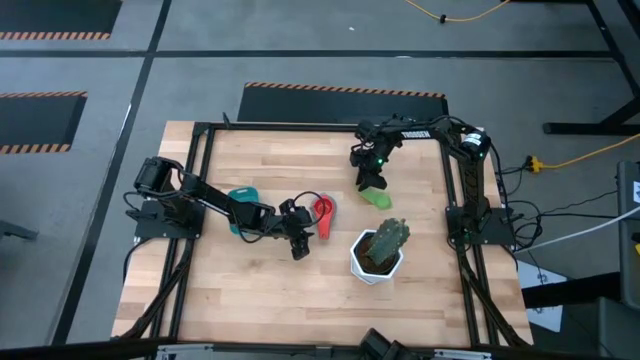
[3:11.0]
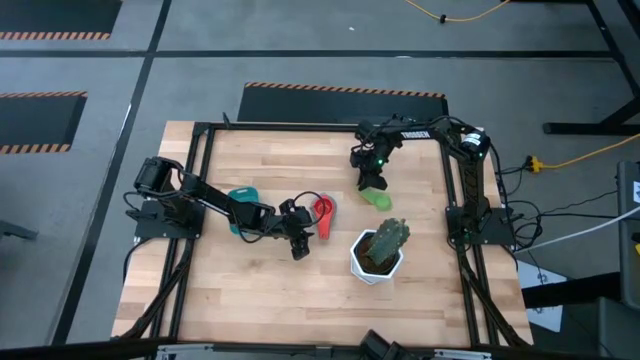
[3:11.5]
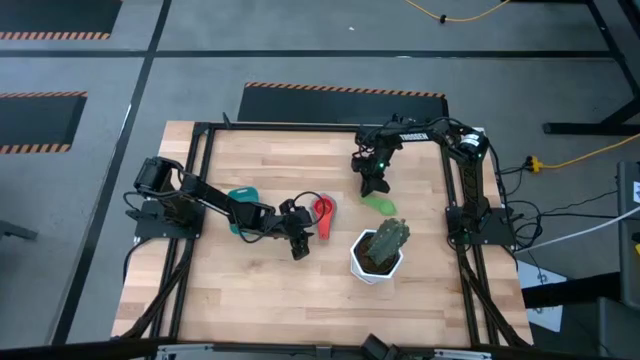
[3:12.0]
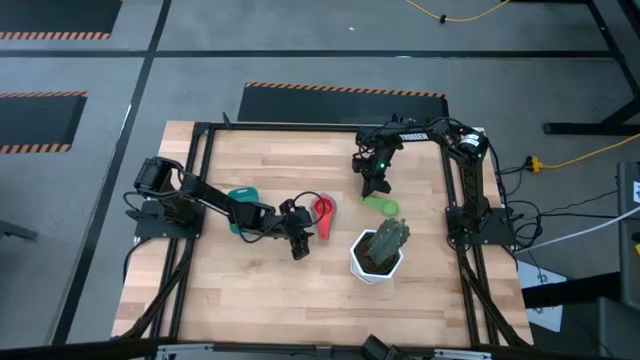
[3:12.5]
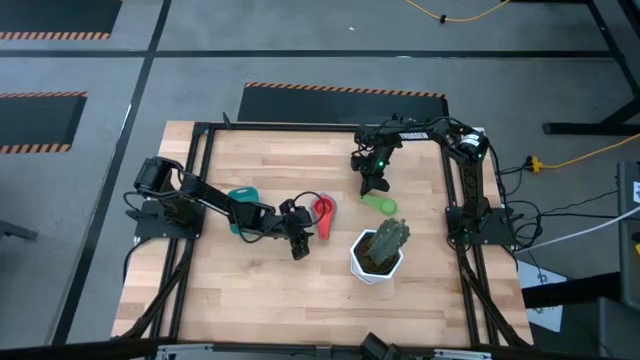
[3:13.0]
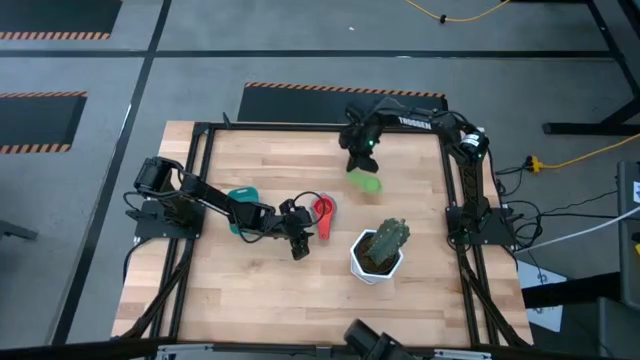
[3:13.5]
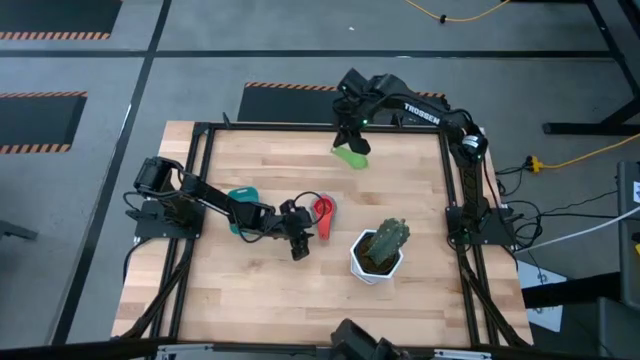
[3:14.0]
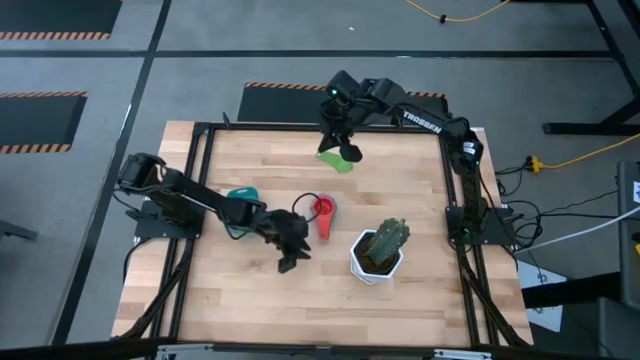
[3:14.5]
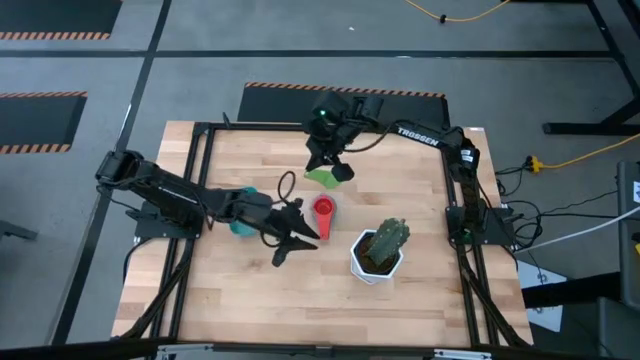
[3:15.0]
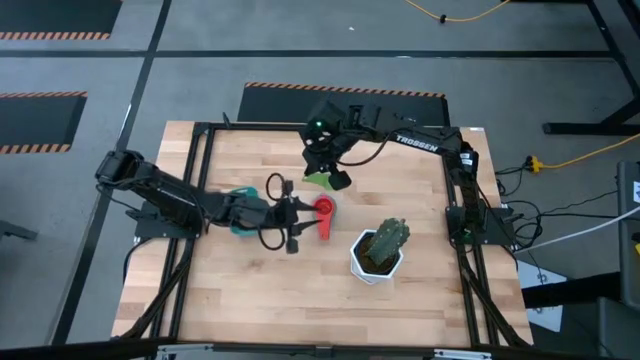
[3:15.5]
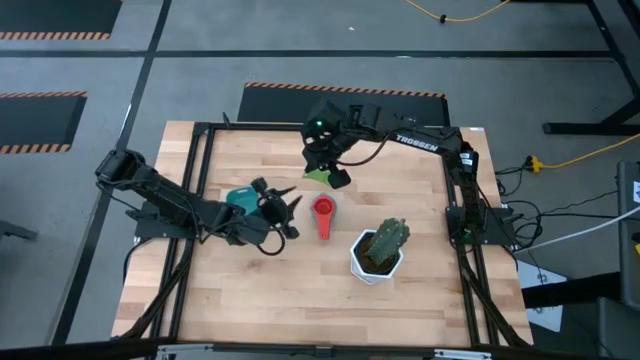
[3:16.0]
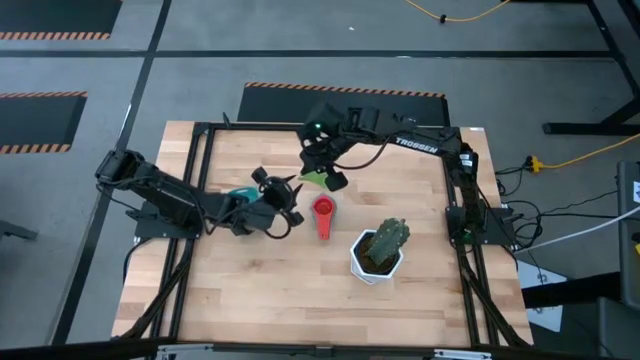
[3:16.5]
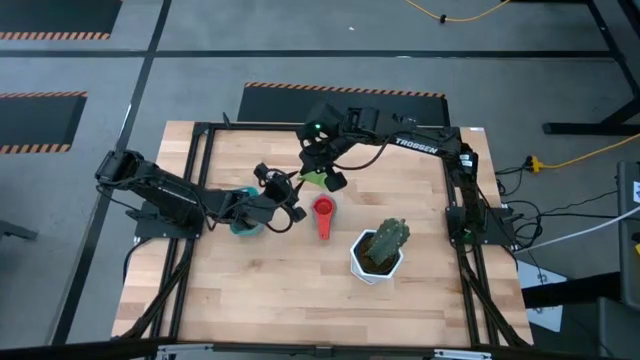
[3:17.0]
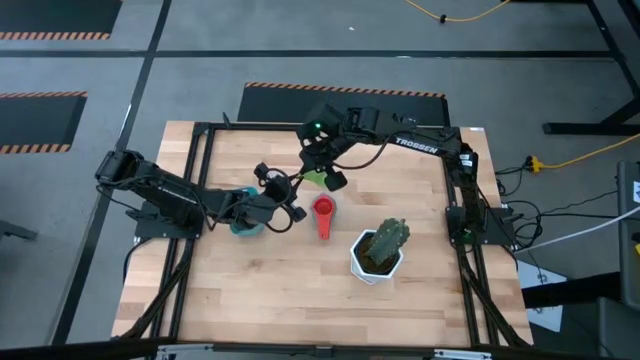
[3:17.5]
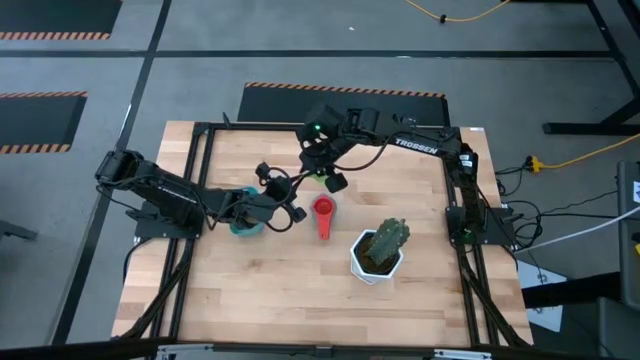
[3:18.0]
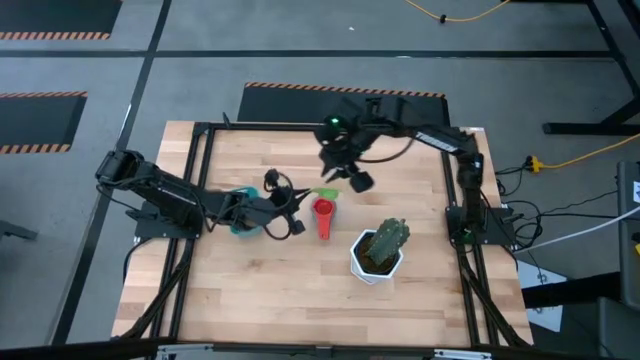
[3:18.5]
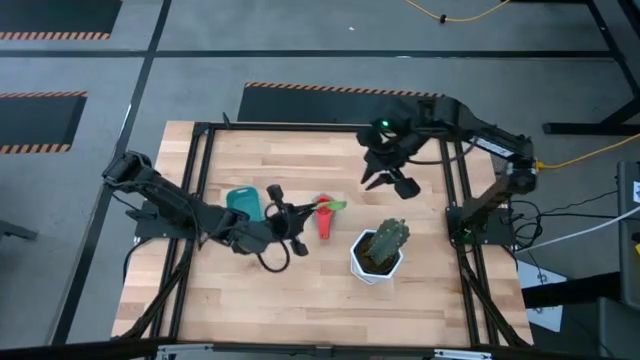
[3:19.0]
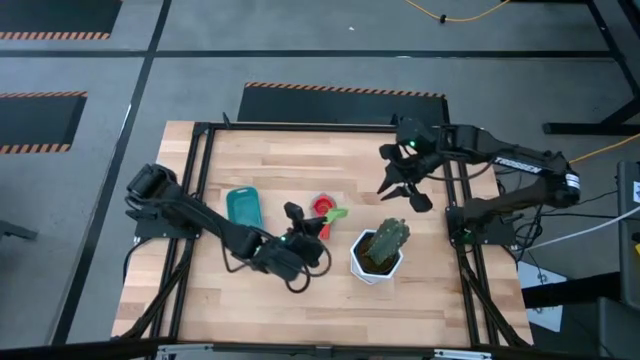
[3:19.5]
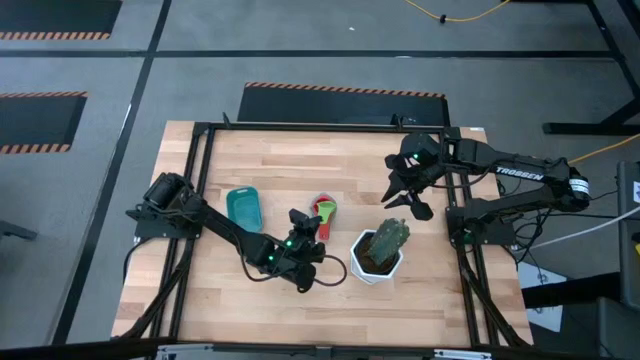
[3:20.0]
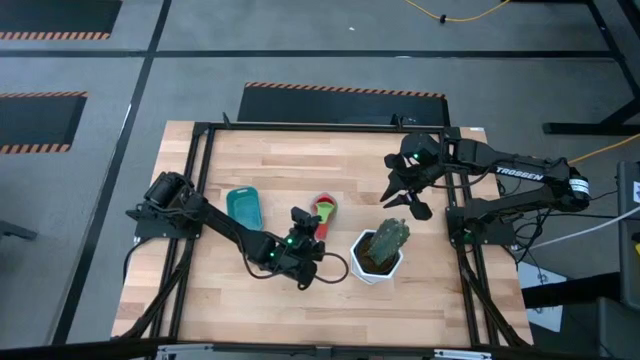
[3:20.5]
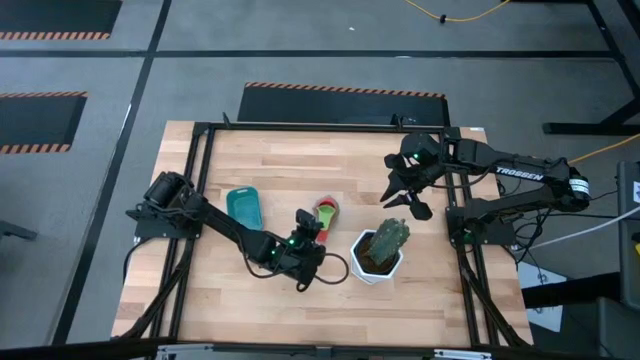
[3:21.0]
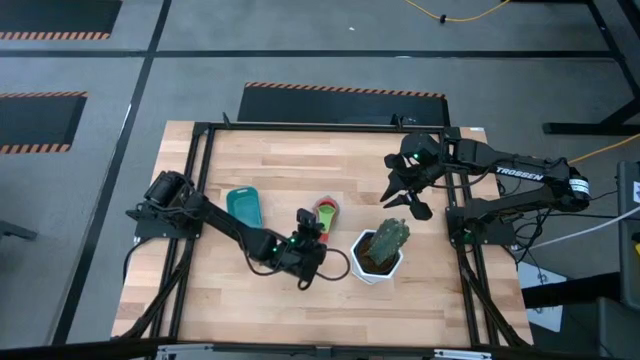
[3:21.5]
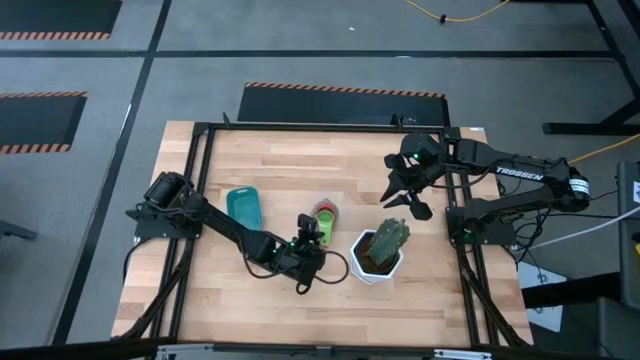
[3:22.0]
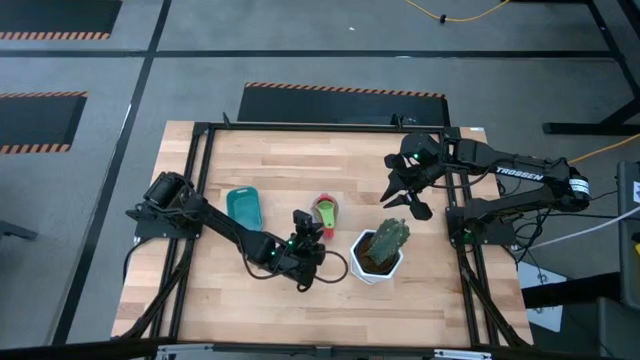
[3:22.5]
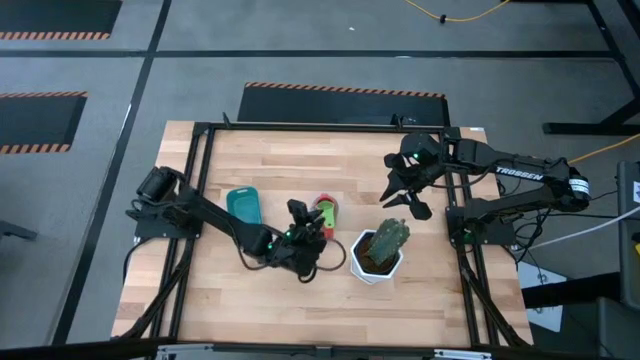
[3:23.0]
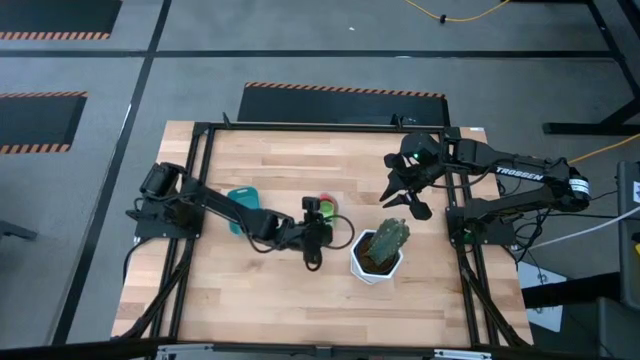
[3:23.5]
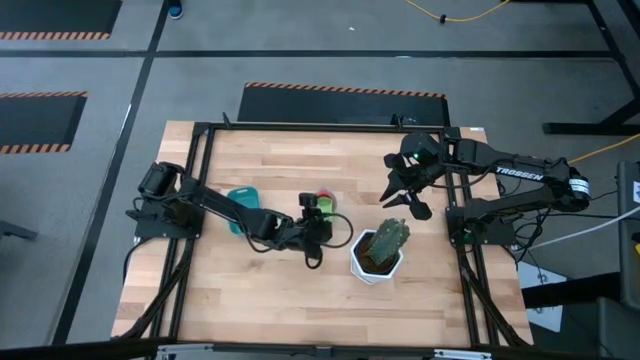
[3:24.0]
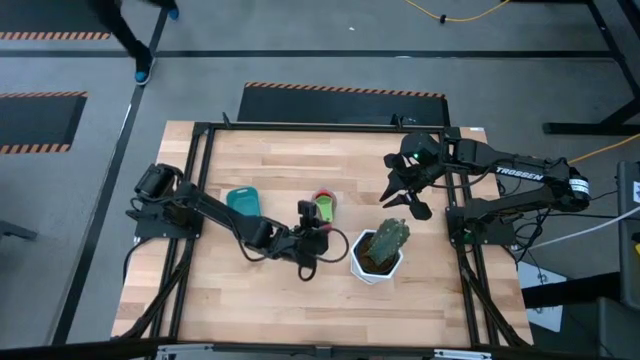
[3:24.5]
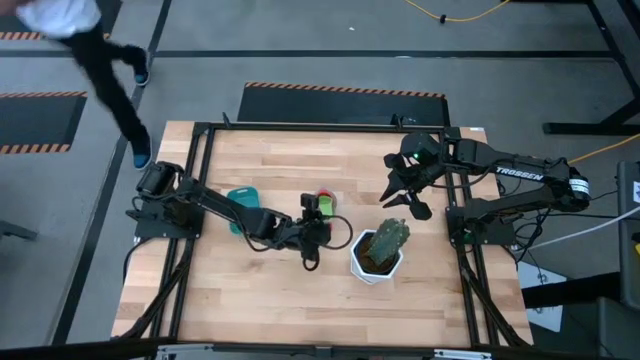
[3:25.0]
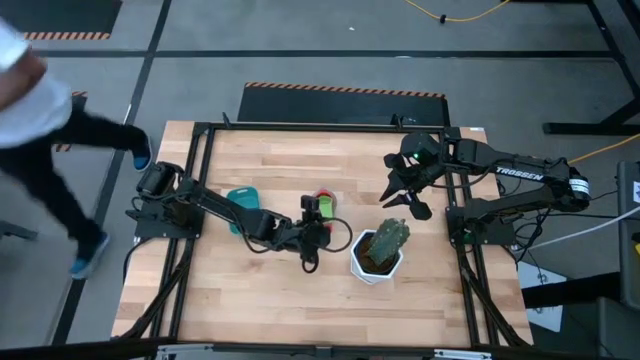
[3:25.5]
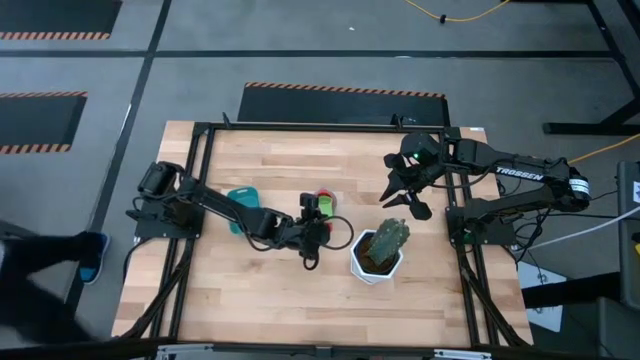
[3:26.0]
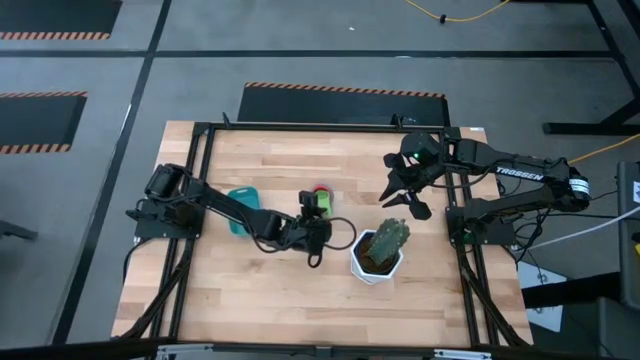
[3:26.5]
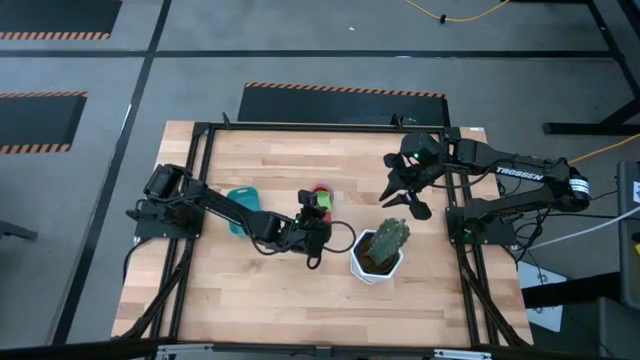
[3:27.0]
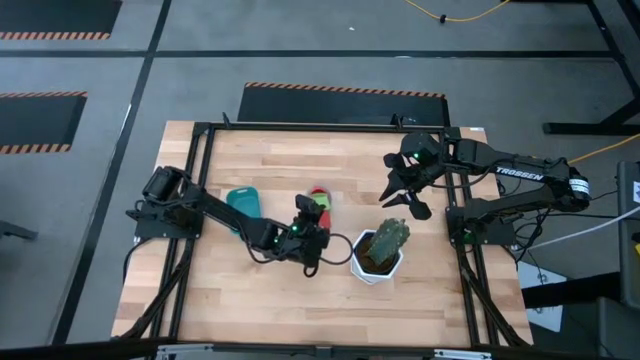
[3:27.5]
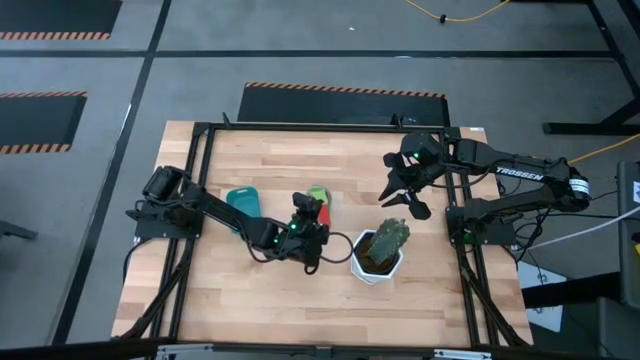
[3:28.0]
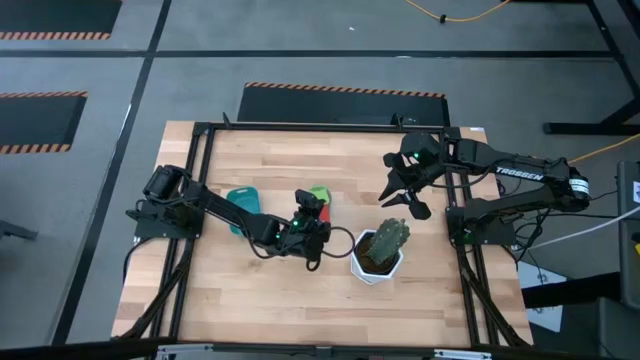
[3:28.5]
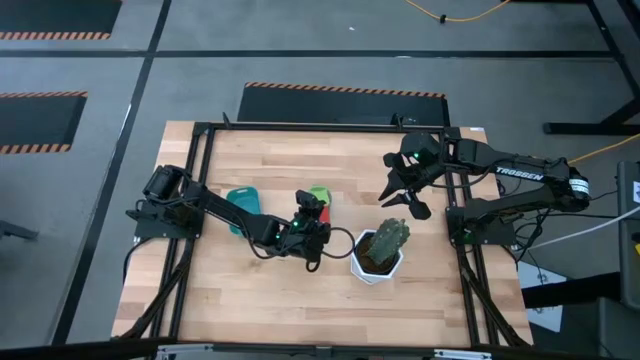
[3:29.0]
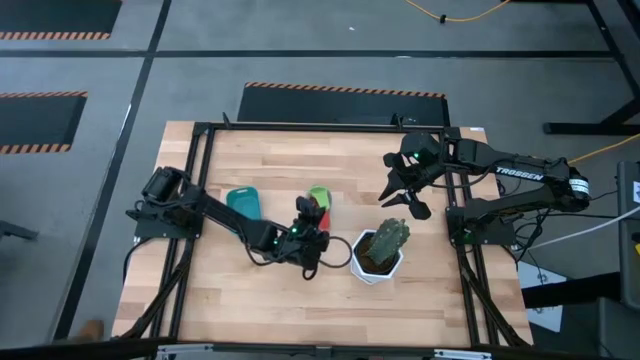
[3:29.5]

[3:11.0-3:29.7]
Task: Nest measuring cups in basket
Stack the green measuring cup on top of the red measuring cup

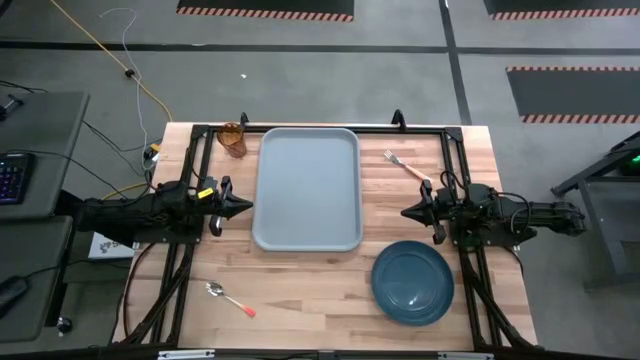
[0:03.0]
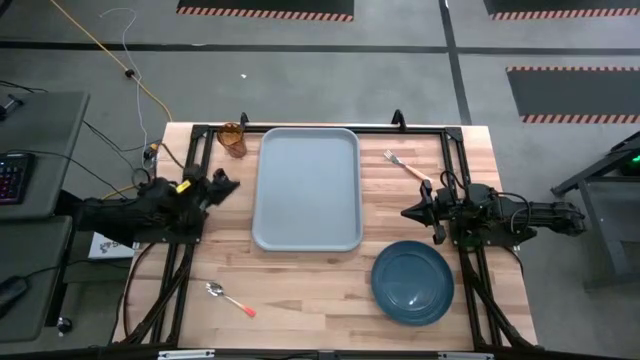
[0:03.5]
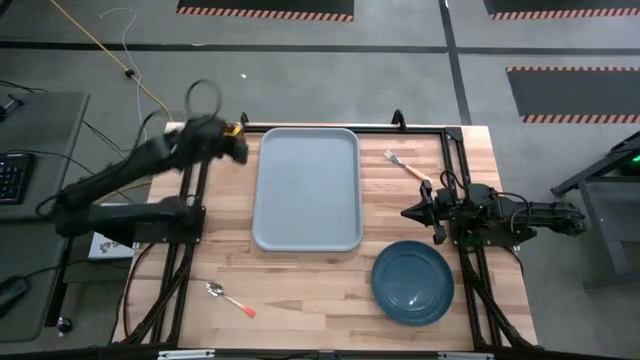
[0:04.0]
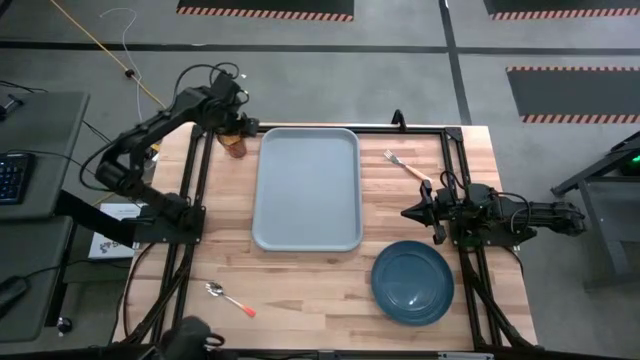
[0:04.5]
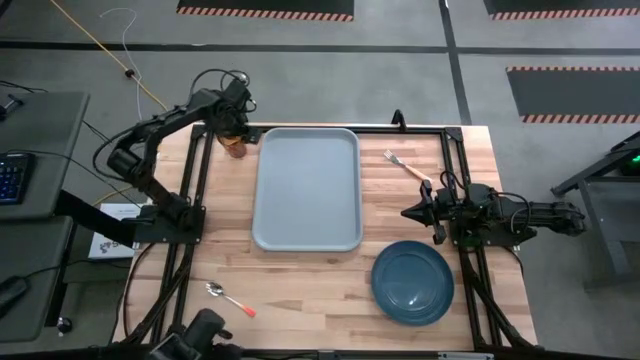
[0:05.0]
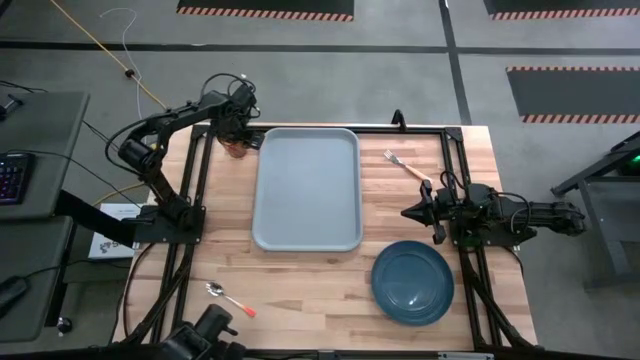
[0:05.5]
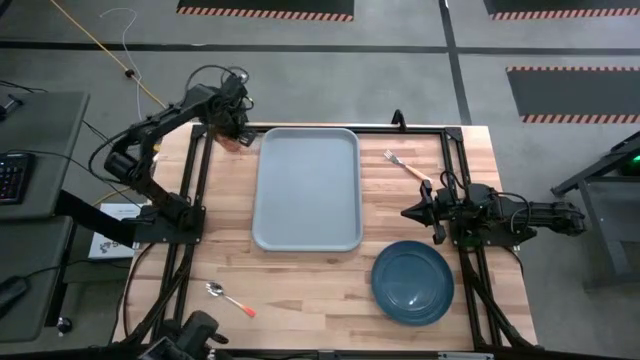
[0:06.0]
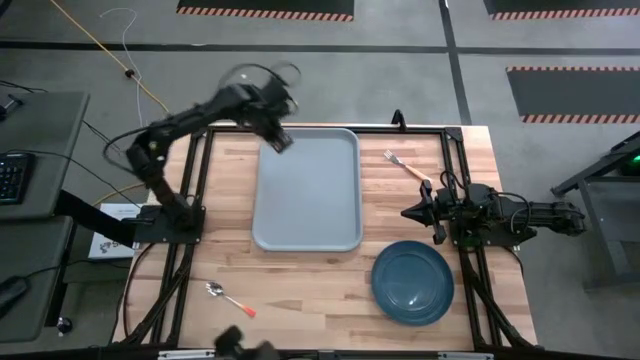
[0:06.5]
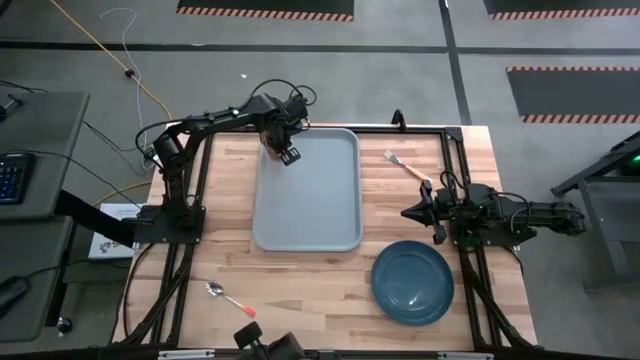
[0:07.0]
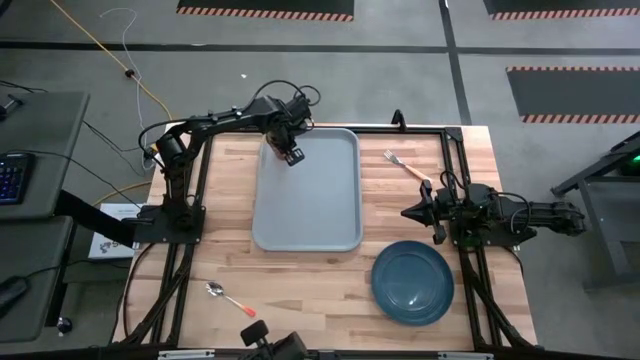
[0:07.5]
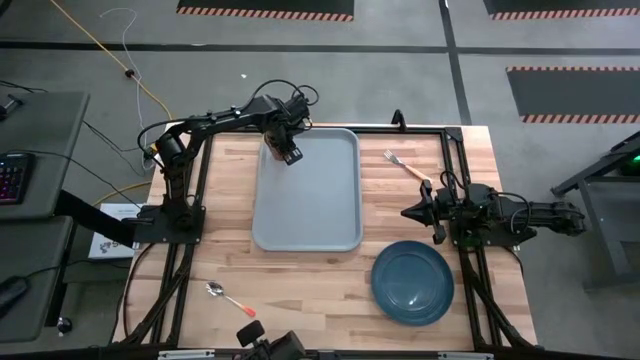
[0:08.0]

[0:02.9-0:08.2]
Task: Pick and place plate/cup/fork/spoon on tray
Put the transparent brown glass on the top left of the gray tray
